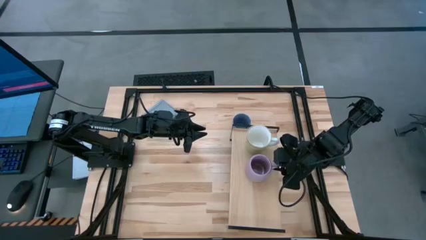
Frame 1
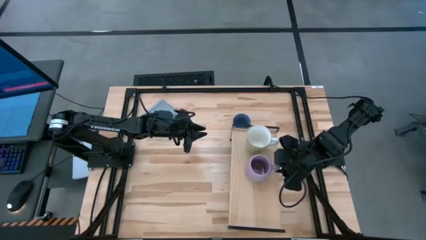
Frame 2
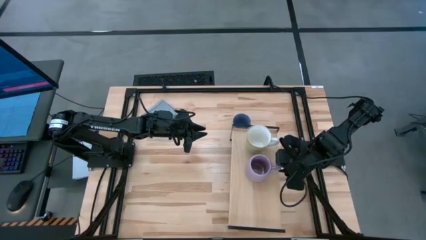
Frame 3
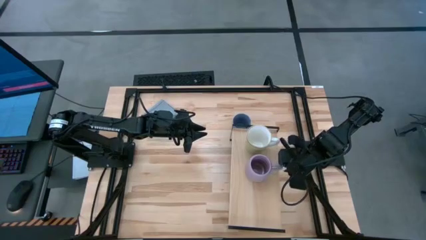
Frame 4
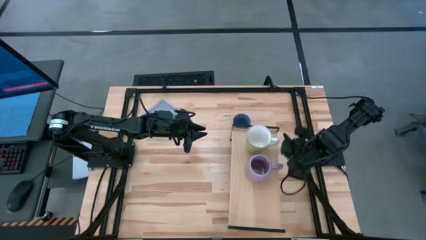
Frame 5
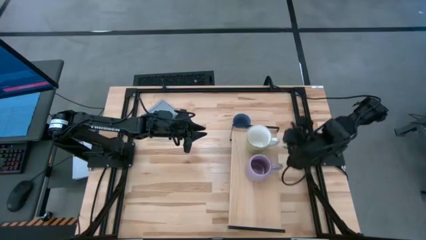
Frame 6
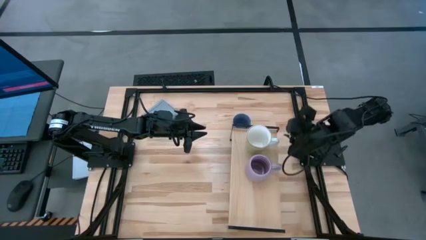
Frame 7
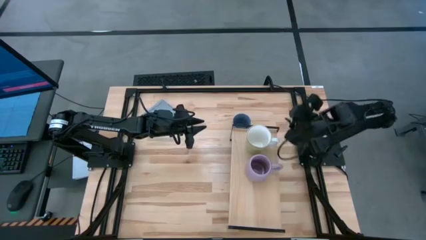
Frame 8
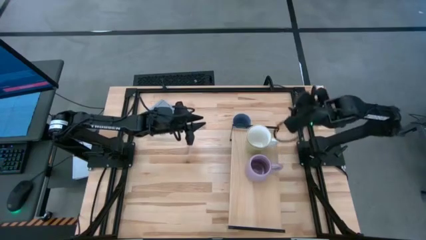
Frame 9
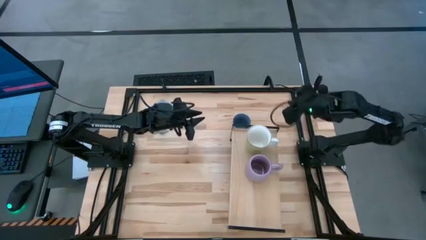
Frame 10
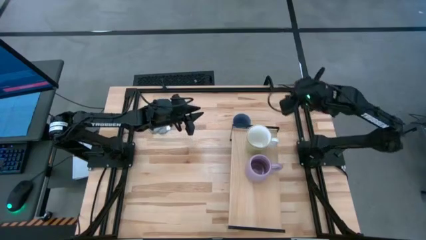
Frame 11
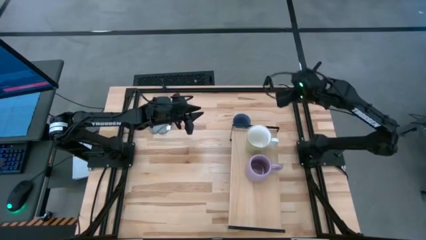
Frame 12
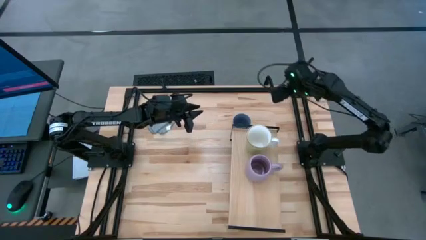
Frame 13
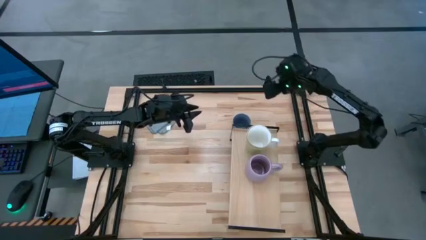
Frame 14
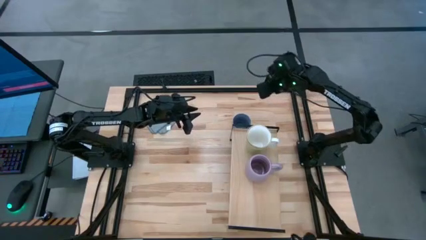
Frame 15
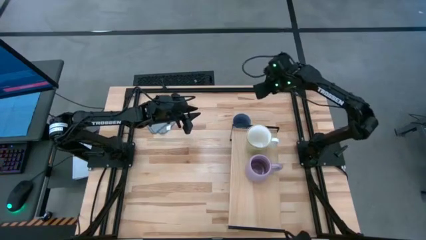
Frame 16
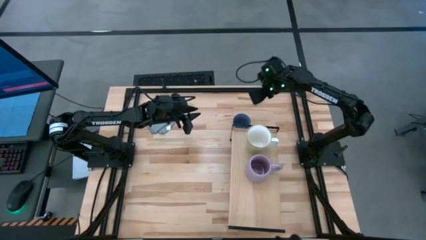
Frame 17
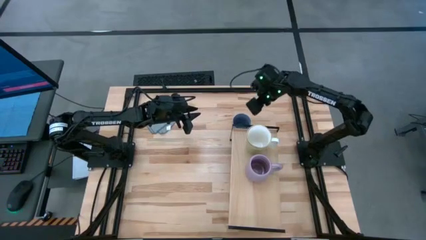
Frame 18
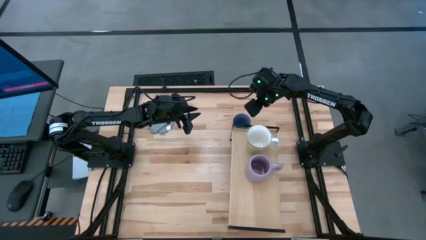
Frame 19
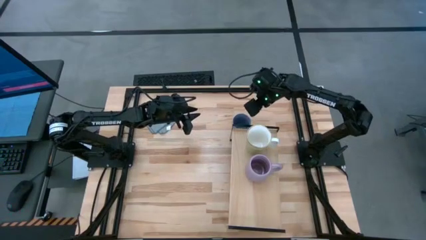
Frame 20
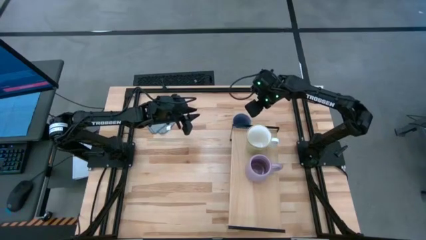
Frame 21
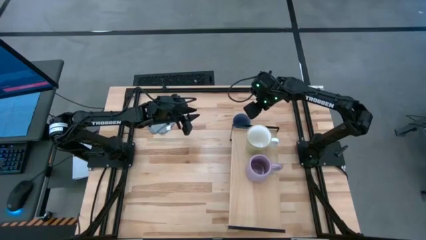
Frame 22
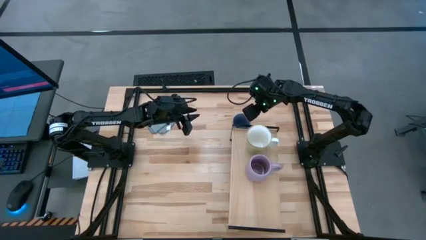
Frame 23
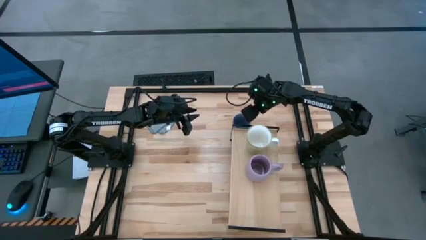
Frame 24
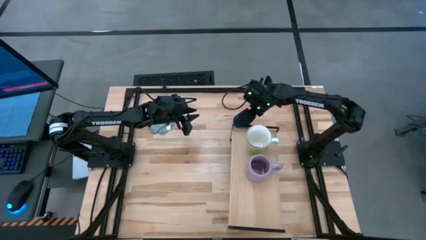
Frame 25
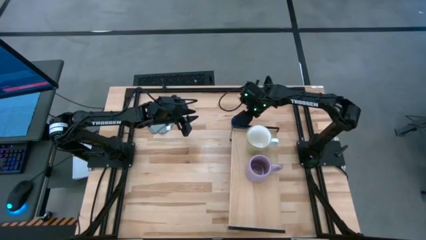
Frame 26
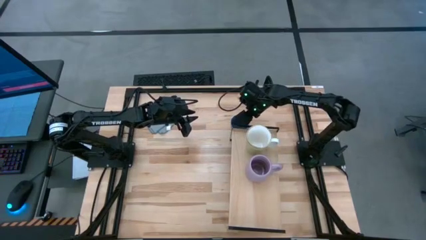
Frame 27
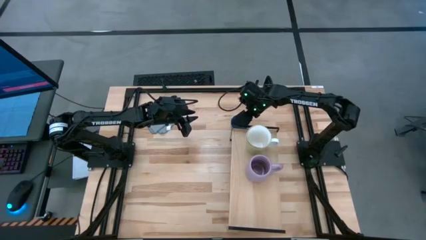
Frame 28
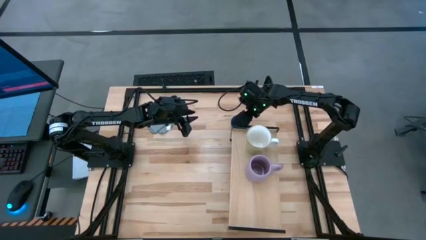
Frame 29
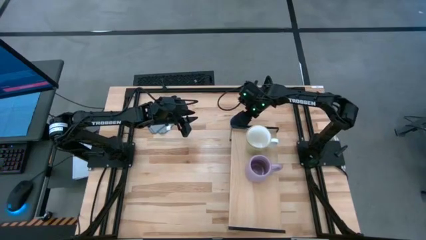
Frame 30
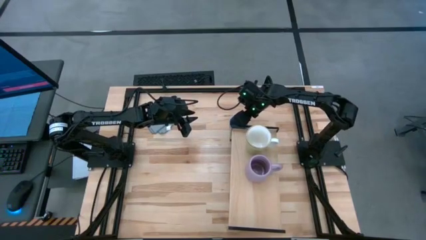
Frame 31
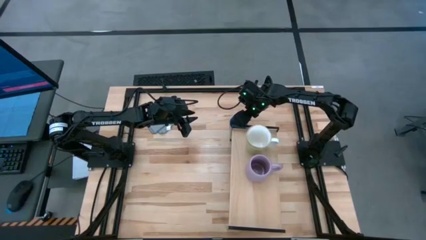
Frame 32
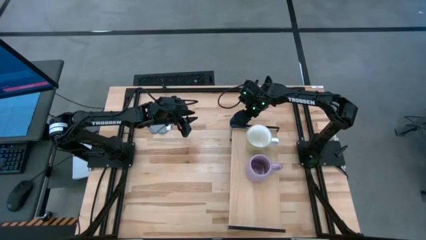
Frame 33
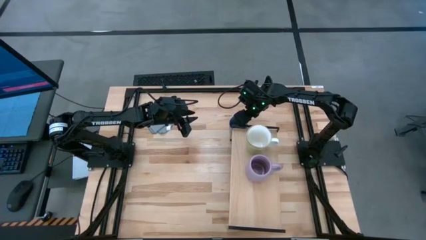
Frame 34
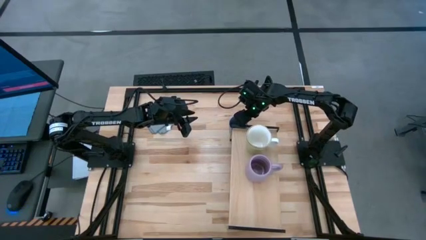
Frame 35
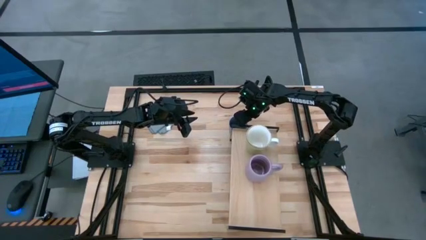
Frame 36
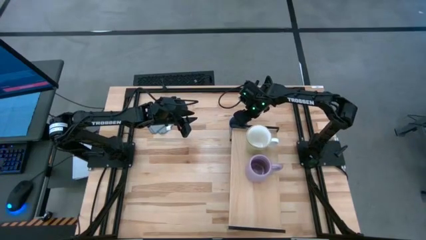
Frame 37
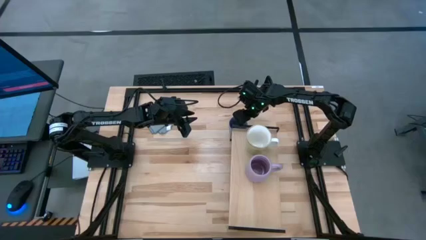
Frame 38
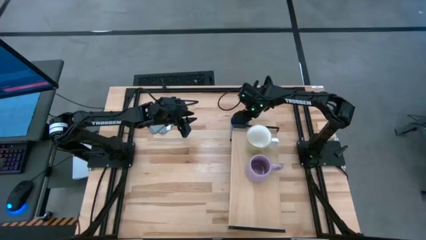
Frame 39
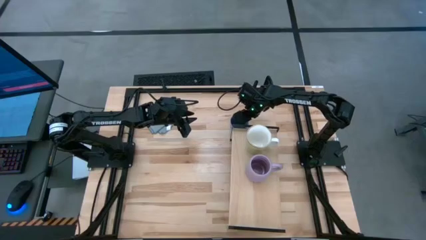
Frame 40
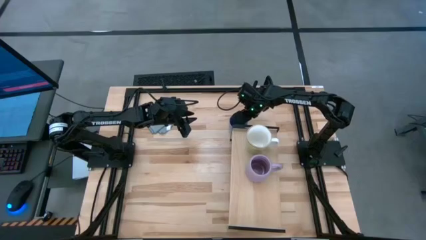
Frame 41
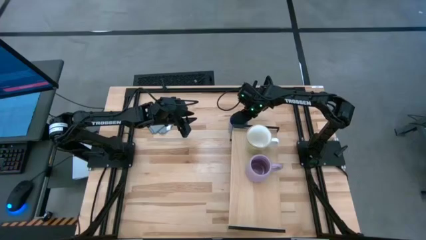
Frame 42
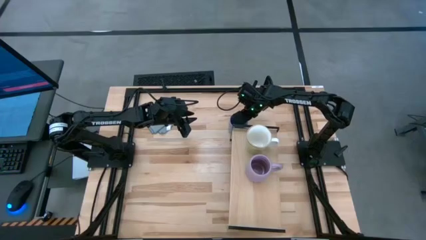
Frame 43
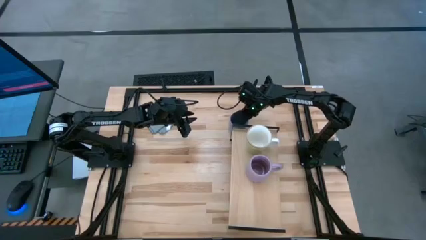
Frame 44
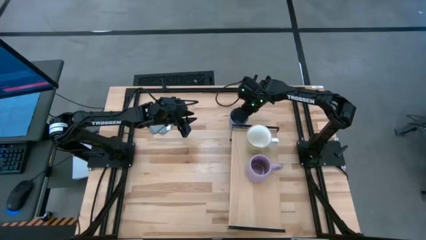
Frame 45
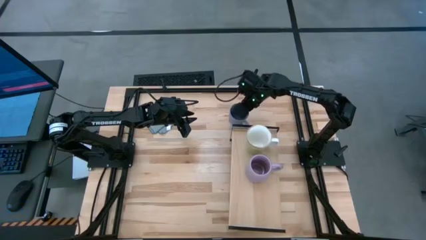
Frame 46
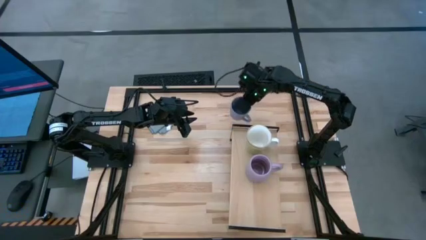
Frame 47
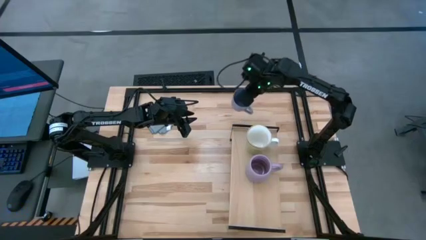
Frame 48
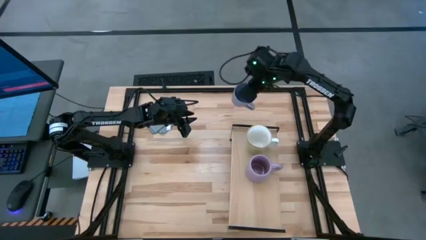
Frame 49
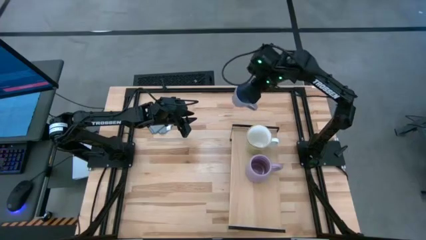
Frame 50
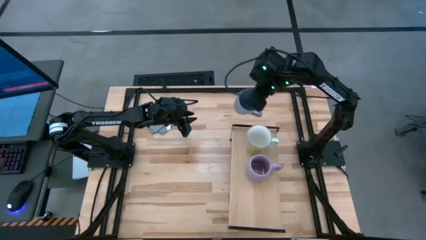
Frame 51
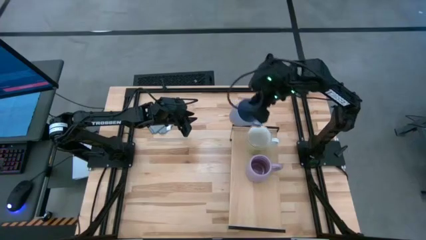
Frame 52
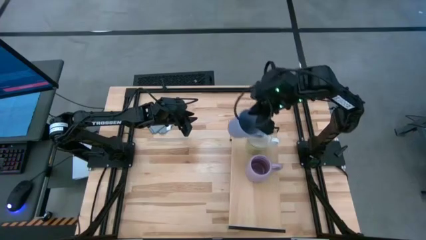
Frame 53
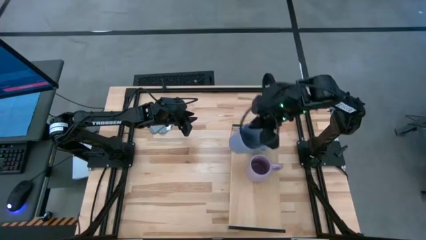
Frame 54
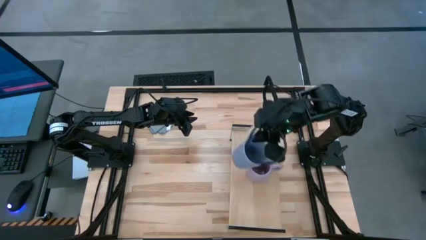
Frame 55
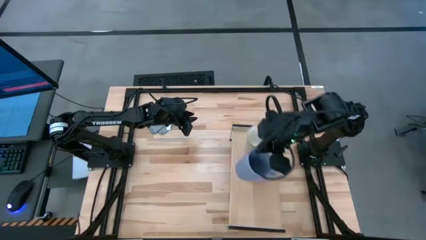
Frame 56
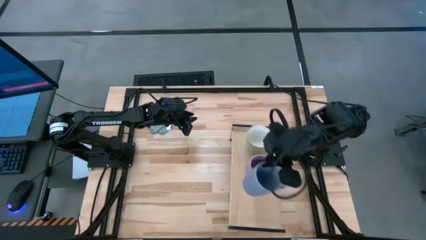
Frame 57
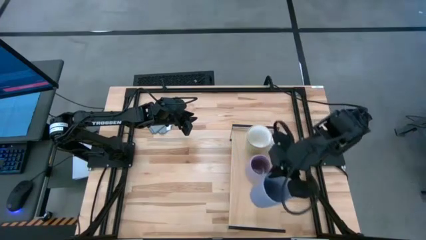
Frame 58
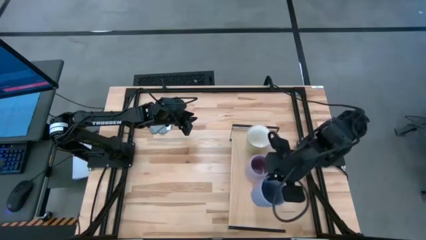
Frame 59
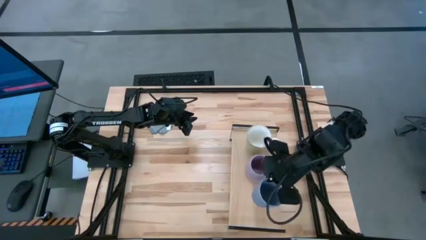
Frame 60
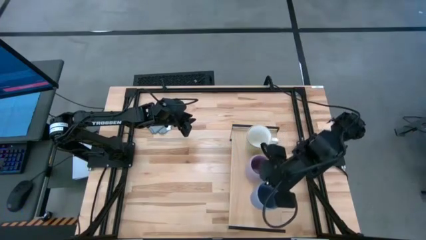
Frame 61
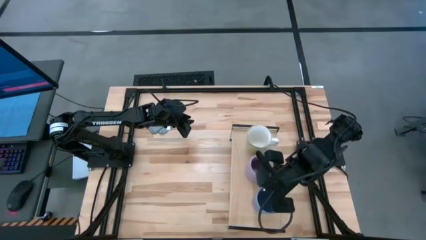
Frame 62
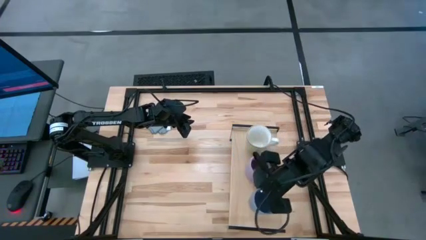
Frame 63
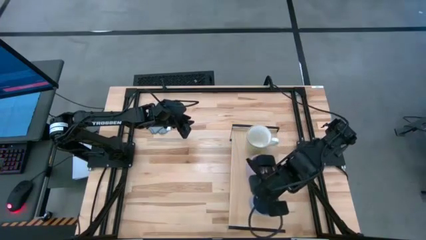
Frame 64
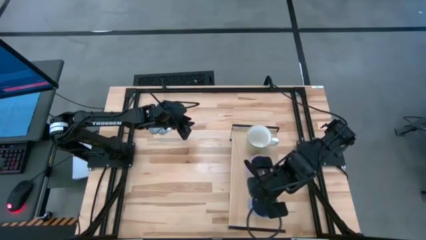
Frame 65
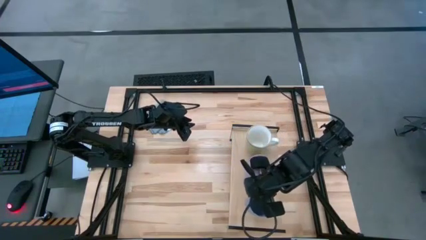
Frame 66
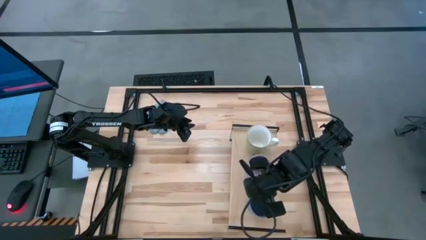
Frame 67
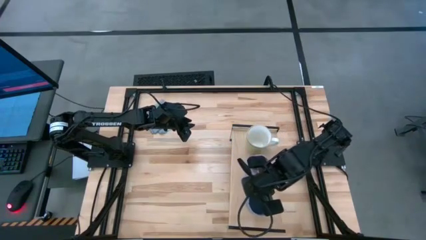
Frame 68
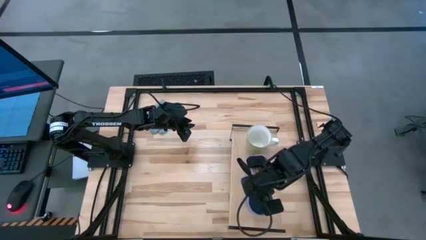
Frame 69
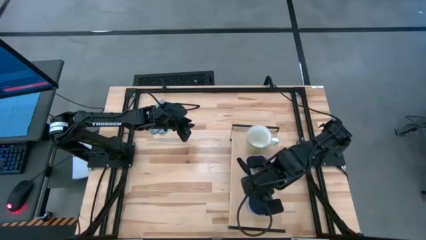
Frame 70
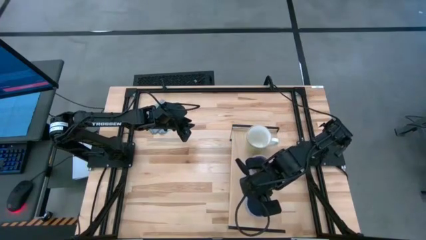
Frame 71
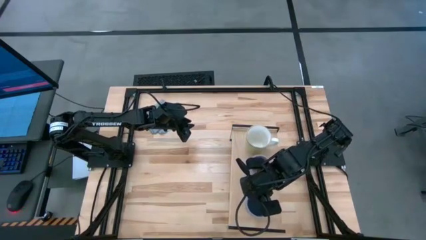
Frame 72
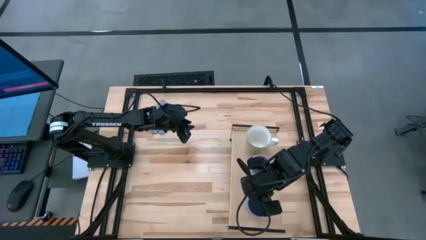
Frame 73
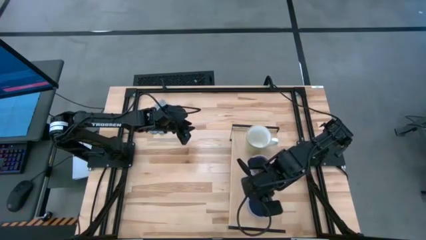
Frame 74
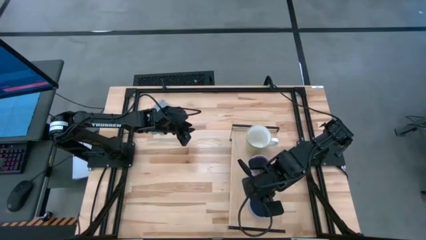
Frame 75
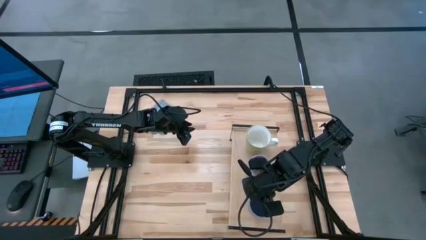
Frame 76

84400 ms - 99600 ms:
Task: Stack small to large cups/mugs on shelf
Put the blue mug on the shelf

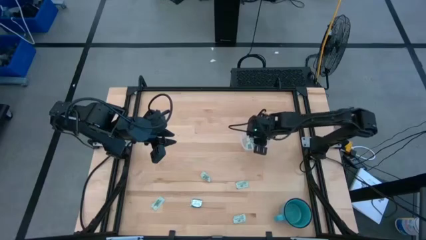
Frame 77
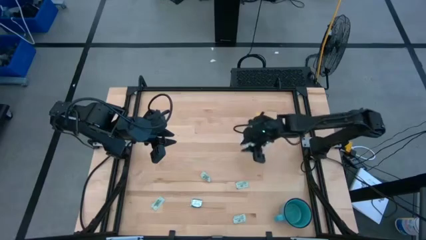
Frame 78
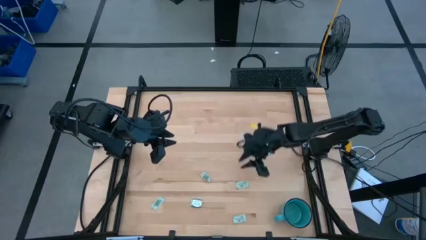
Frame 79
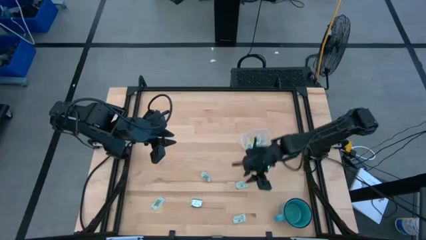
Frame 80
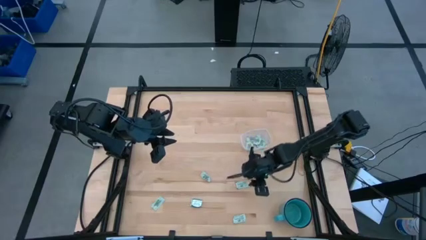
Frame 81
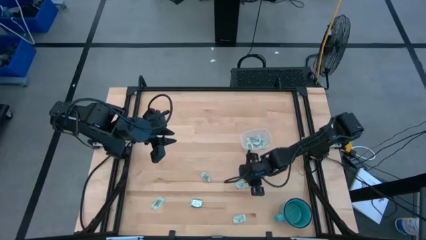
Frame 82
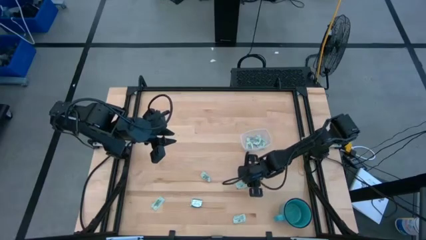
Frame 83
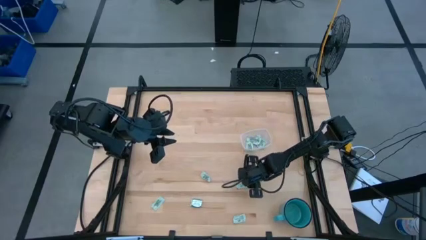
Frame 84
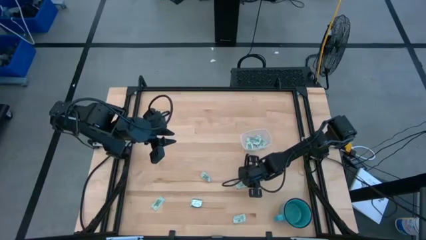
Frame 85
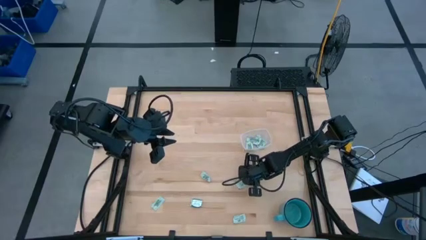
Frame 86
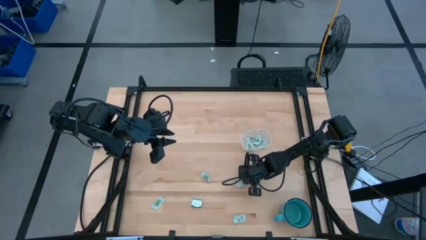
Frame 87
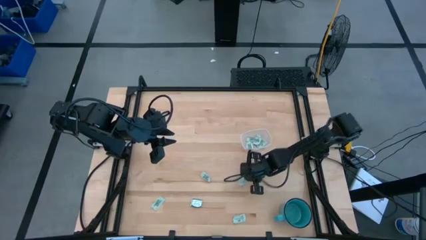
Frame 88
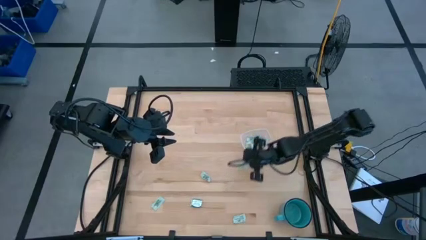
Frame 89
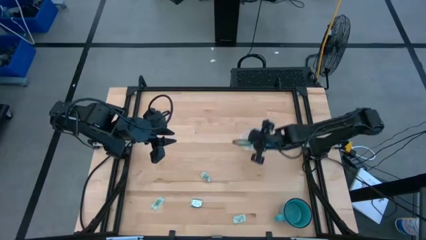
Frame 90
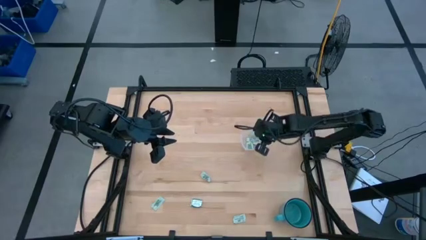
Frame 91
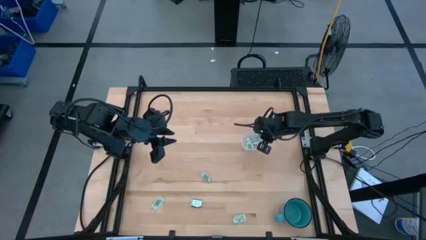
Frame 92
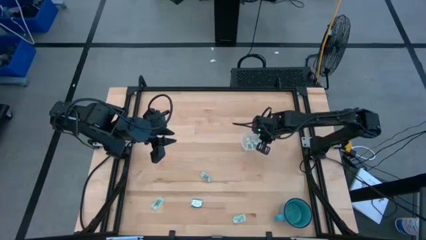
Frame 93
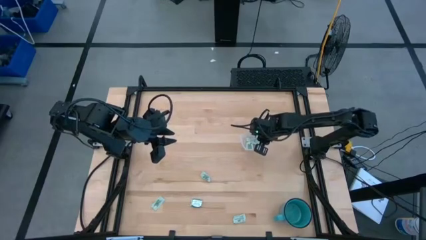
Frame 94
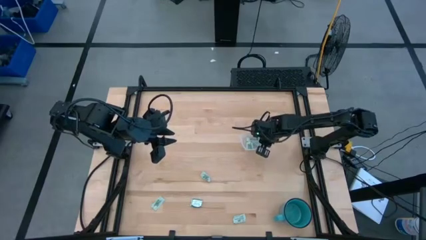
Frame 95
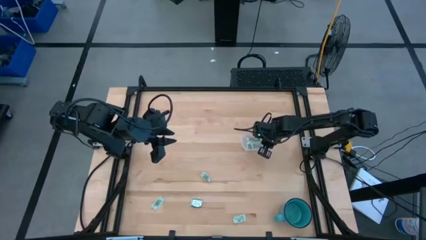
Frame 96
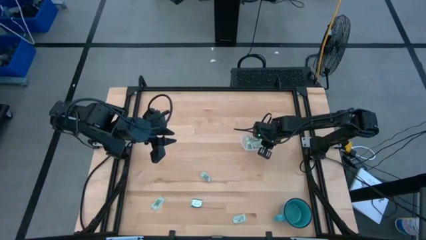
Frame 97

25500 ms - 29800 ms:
Task: Pick and place Stevia / Truvia into bins
Put the green stevia packet into the transparent bin
